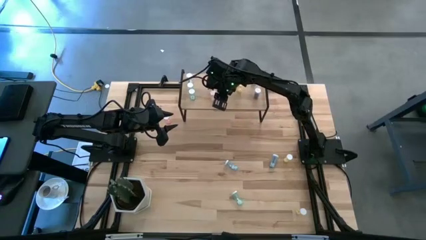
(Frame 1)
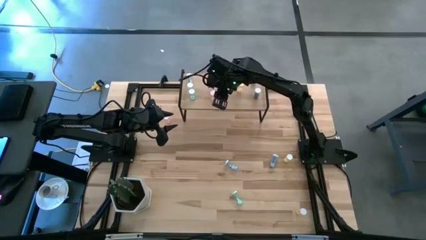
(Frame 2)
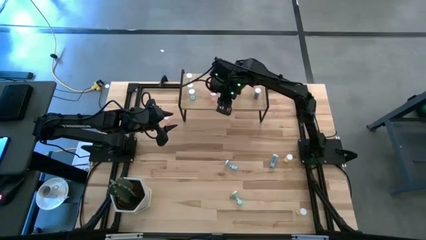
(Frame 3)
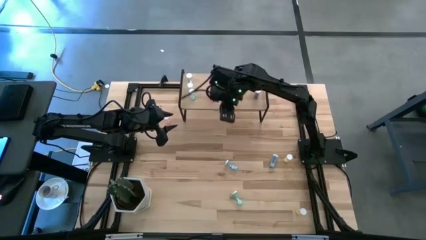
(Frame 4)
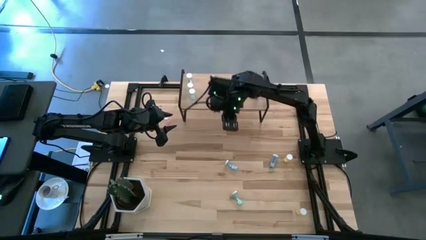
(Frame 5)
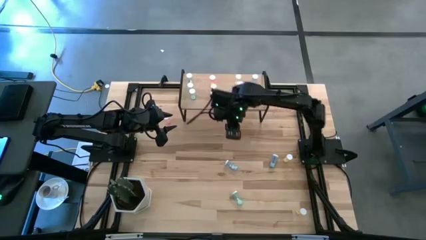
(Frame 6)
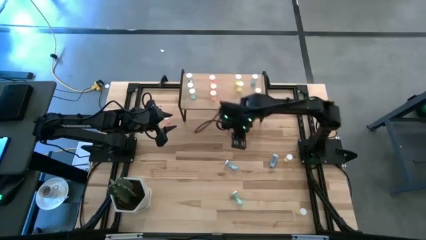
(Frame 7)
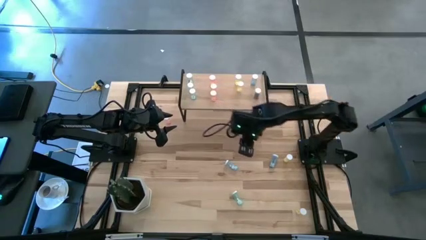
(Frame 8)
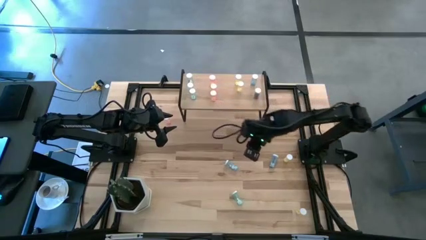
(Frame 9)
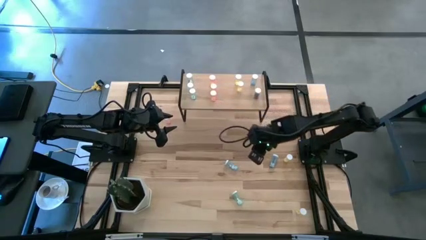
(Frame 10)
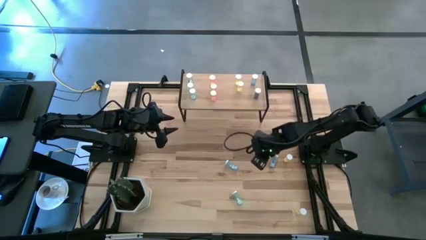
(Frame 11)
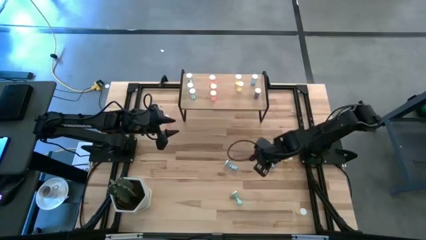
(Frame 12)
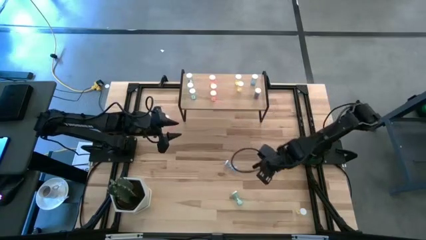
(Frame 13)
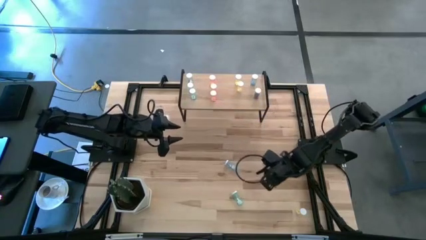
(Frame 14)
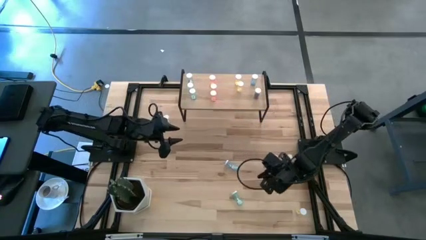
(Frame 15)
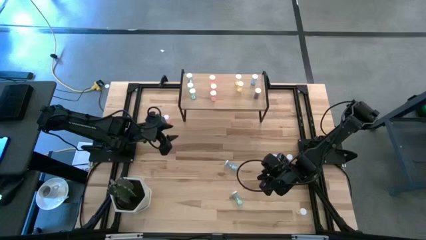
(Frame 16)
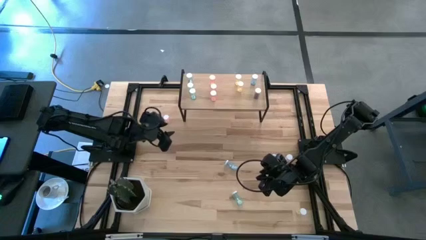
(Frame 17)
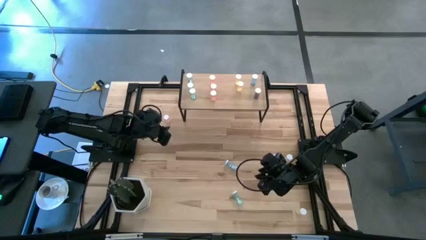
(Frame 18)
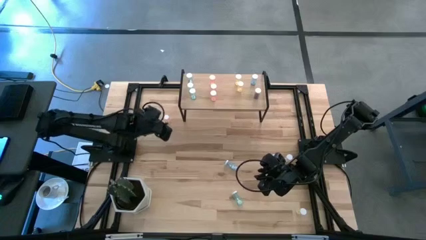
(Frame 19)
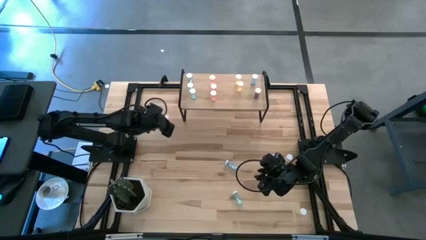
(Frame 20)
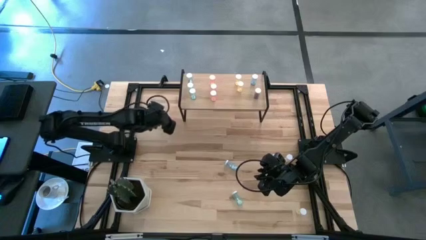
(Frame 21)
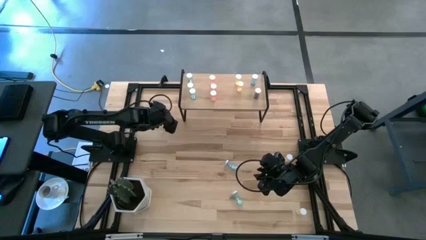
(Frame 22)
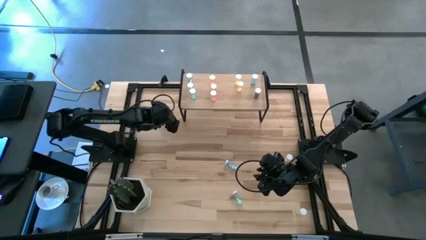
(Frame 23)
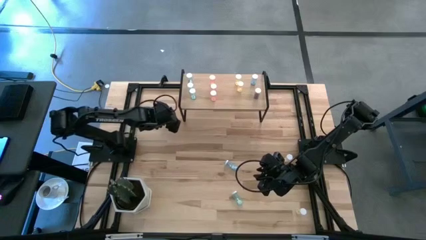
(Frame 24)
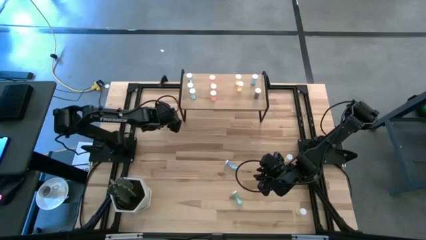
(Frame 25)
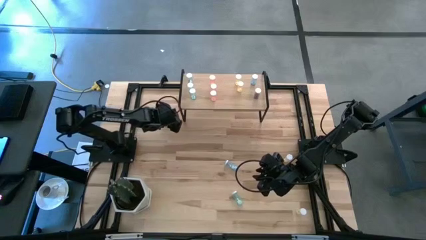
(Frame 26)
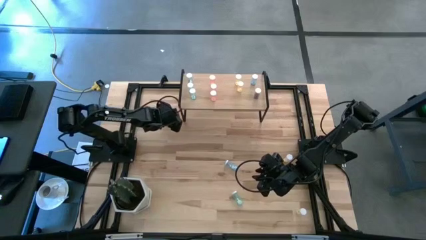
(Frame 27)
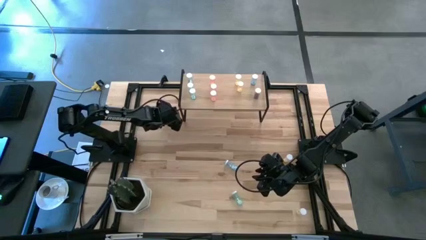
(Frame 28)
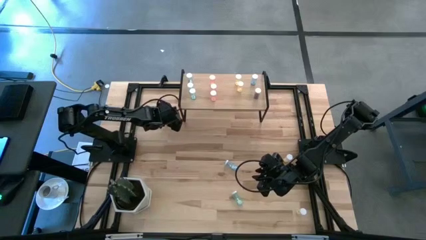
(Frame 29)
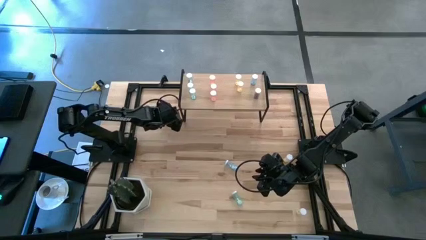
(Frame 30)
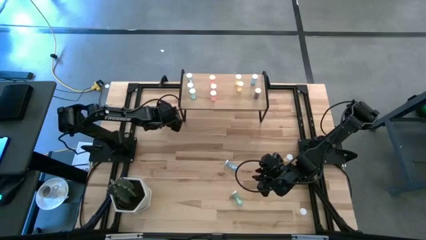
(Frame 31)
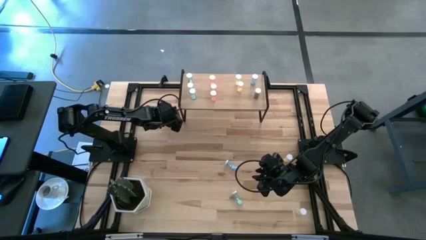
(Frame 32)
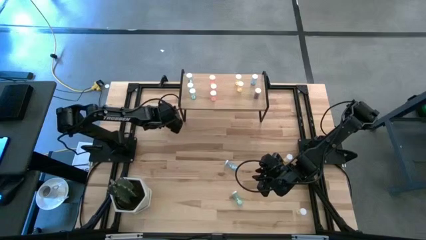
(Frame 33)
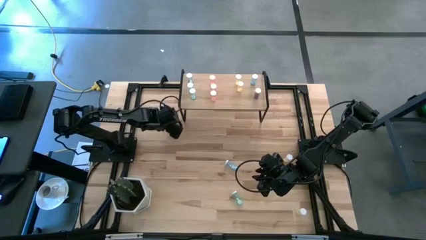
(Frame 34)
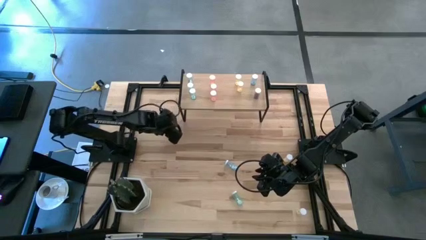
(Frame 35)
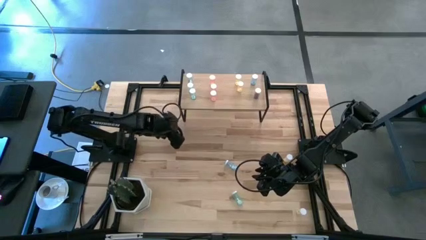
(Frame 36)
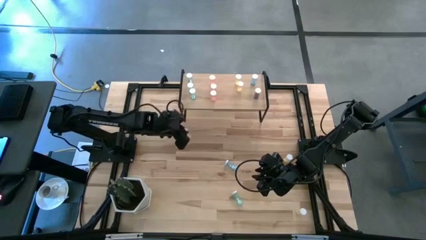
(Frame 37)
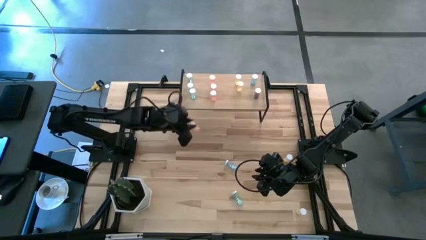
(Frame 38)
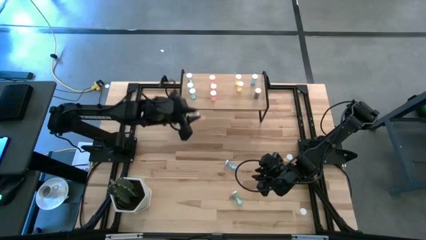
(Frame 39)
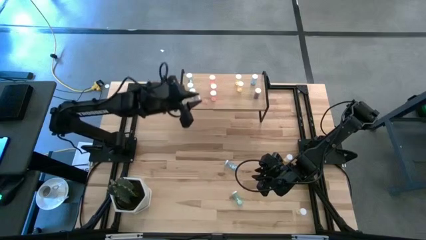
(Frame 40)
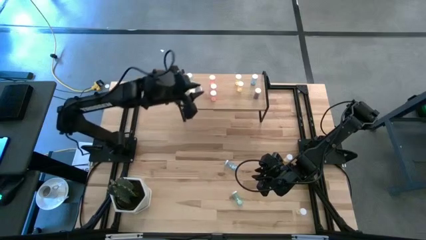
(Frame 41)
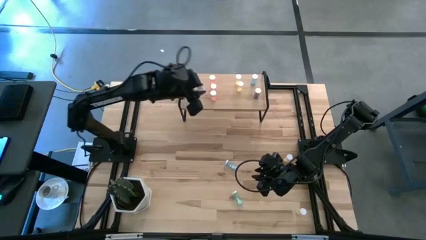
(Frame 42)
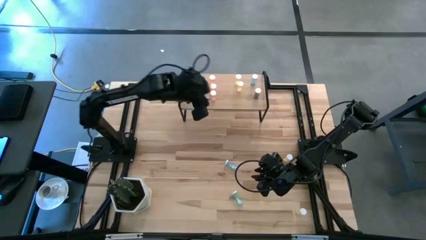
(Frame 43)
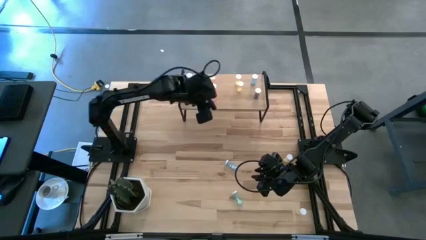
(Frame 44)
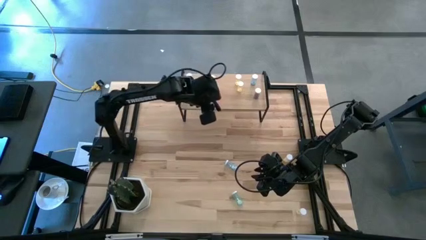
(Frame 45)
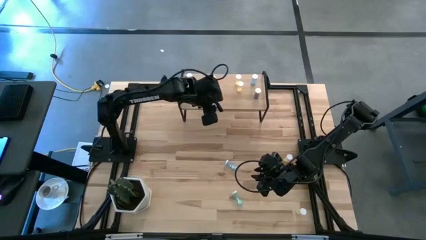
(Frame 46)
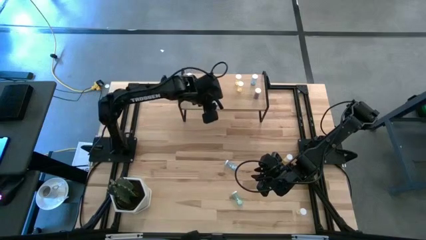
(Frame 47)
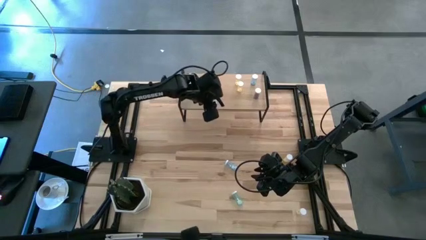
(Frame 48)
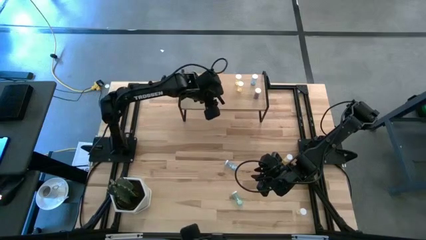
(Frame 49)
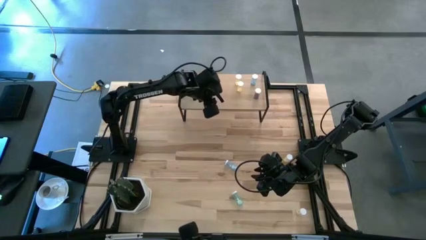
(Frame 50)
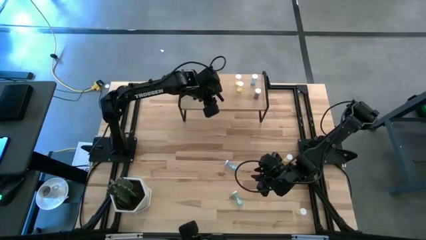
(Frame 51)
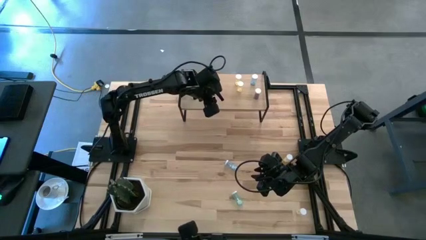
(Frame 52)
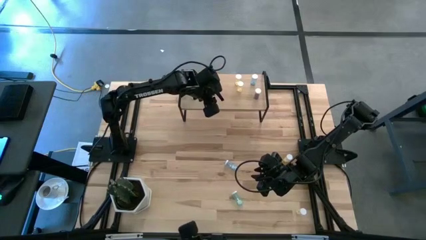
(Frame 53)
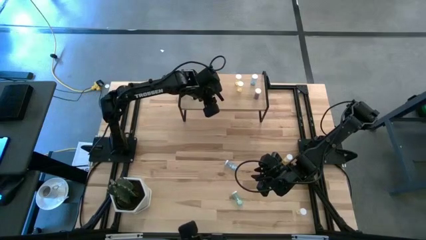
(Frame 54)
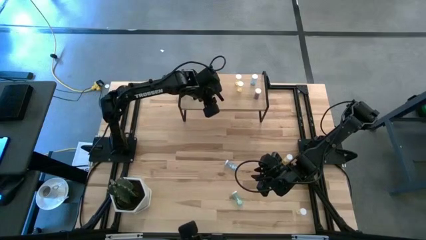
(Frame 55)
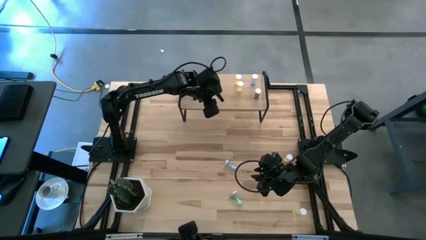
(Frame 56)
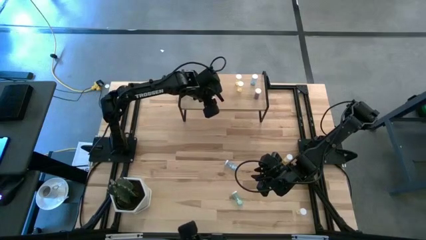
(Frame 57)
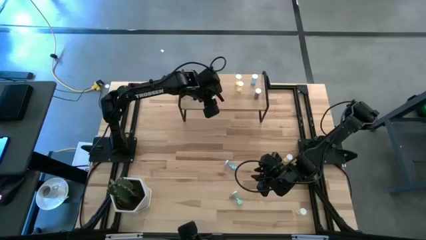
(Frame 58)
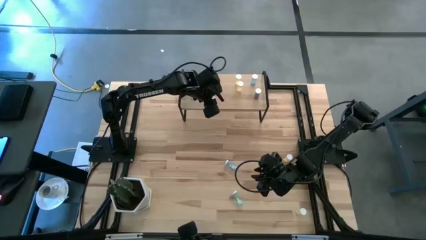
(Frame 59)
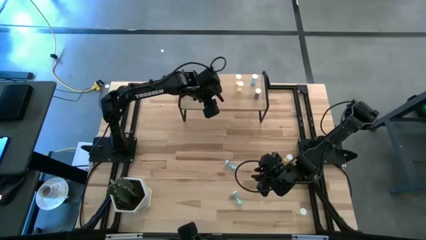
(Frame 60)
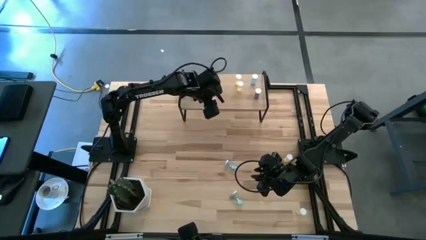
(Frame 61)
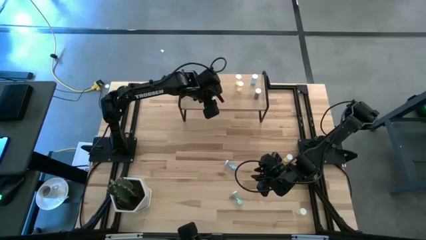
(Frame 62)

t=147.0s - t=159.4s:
Task: Pick and place medicine bottles onto shelf by color
Align the pink pill bottle with the pink pill bottle
